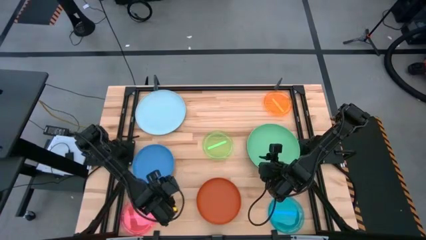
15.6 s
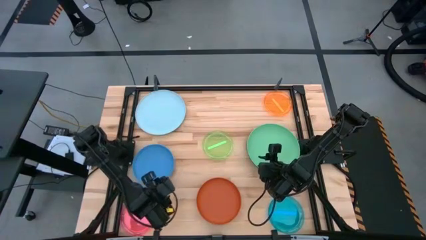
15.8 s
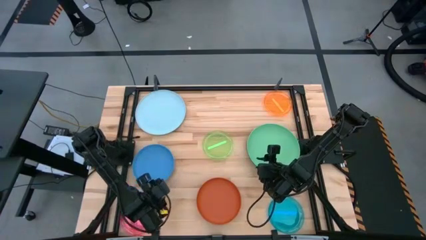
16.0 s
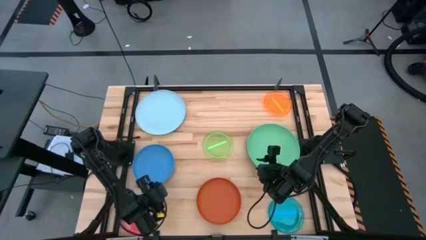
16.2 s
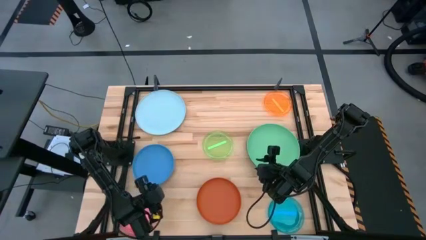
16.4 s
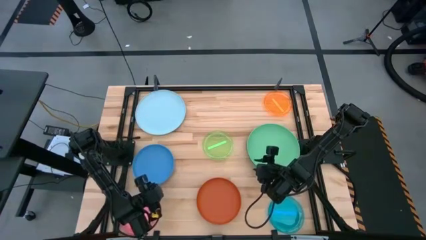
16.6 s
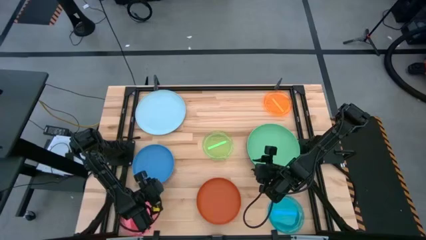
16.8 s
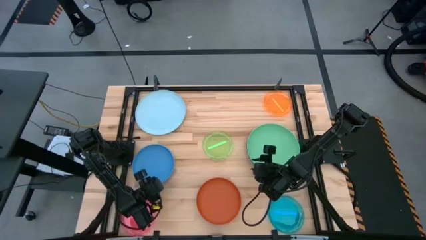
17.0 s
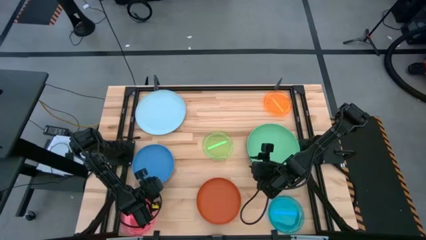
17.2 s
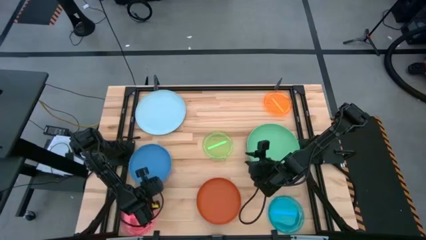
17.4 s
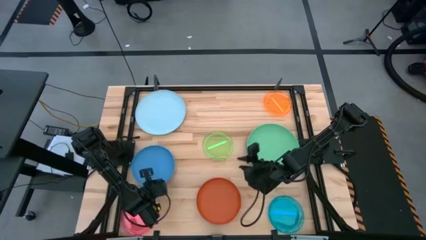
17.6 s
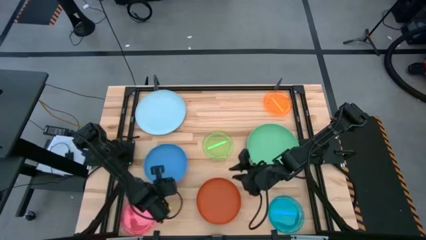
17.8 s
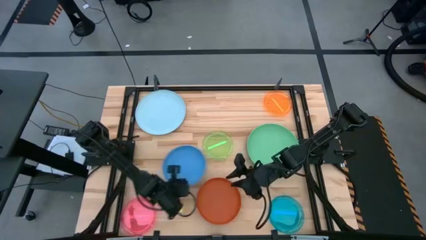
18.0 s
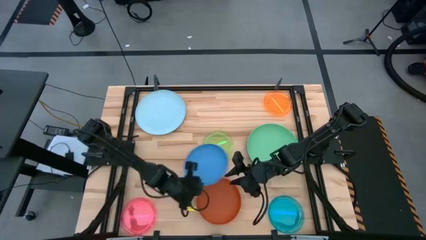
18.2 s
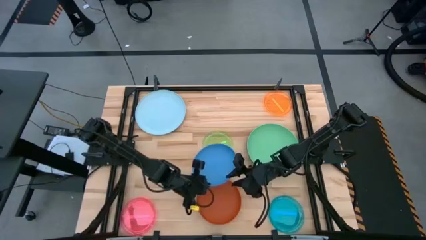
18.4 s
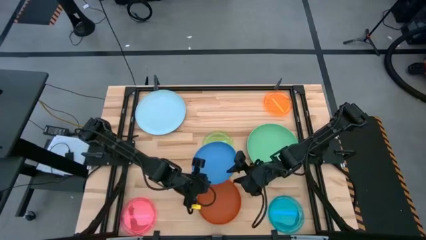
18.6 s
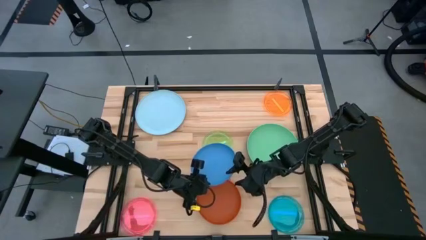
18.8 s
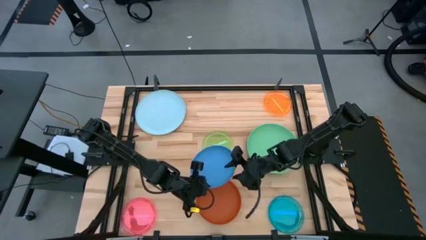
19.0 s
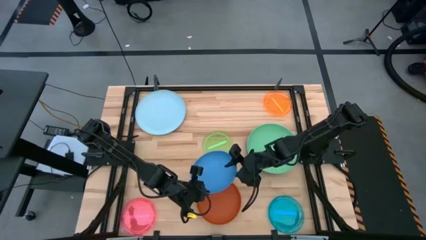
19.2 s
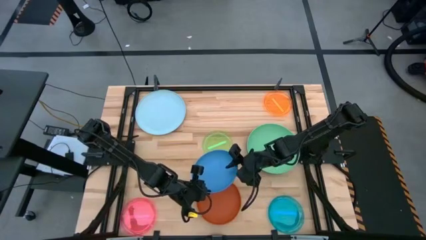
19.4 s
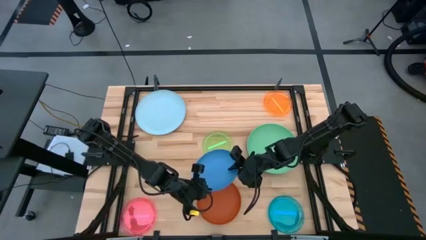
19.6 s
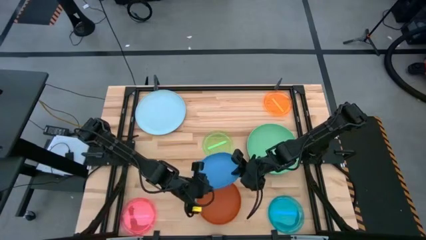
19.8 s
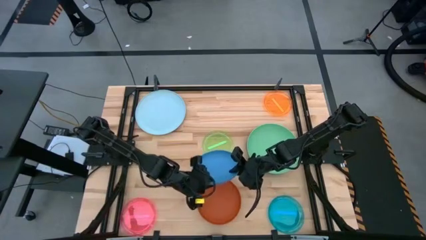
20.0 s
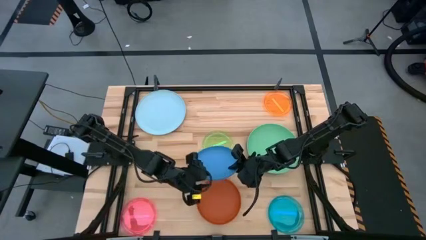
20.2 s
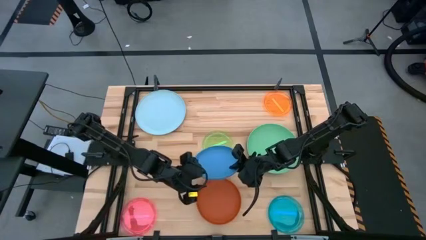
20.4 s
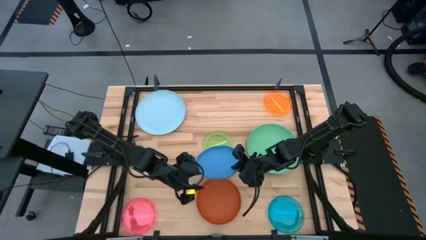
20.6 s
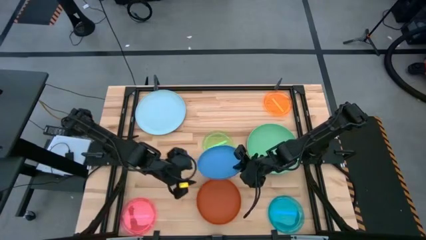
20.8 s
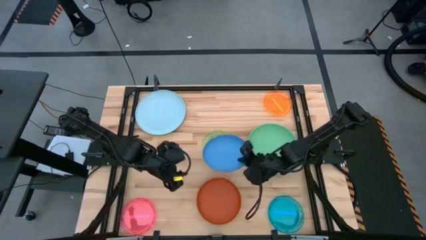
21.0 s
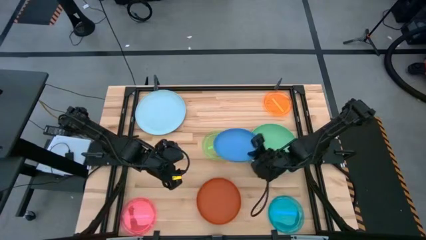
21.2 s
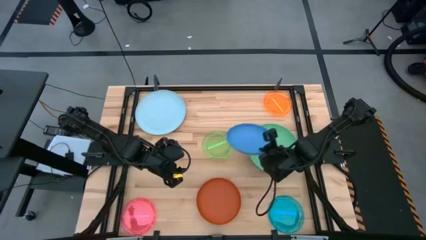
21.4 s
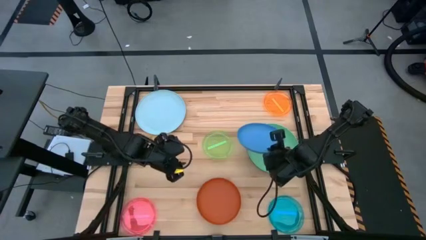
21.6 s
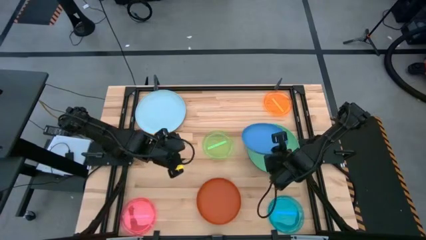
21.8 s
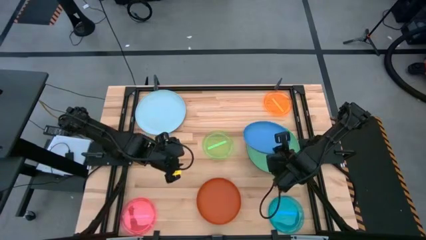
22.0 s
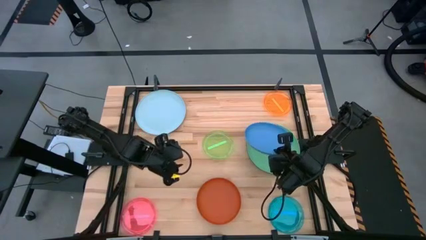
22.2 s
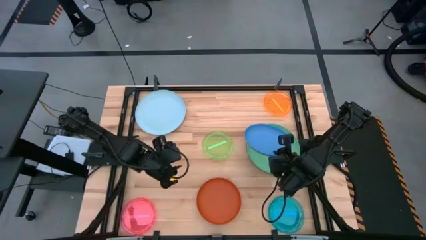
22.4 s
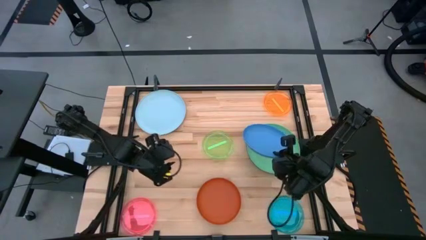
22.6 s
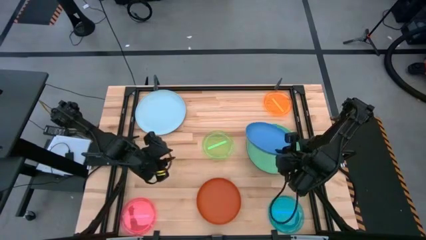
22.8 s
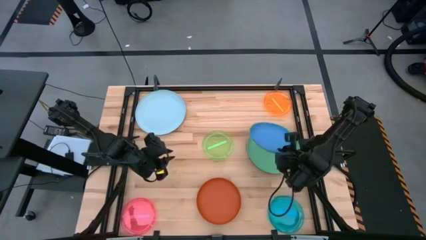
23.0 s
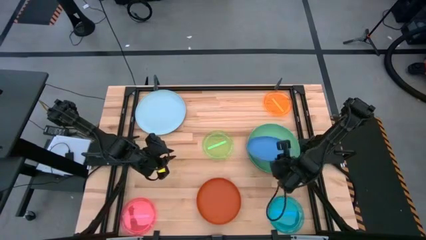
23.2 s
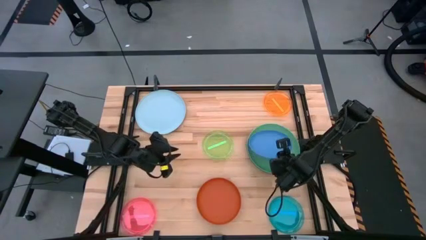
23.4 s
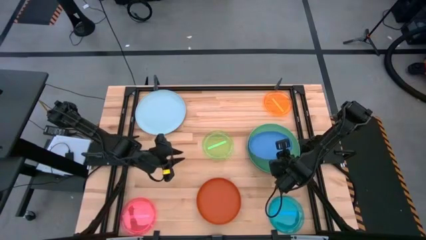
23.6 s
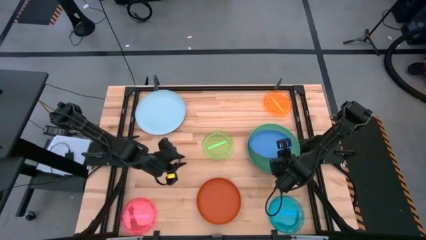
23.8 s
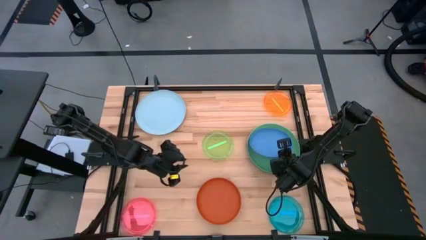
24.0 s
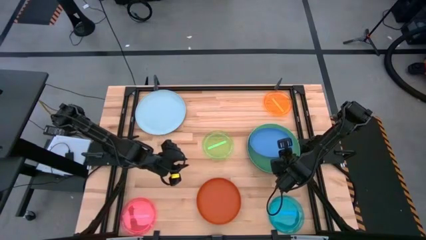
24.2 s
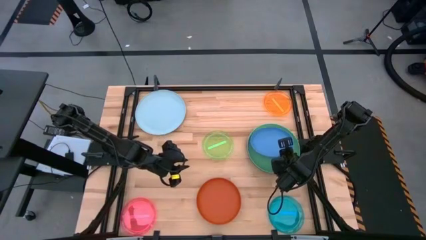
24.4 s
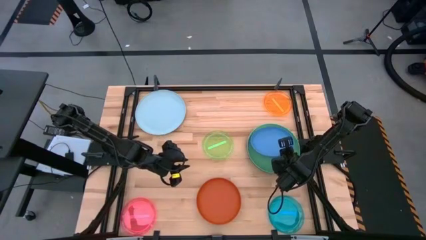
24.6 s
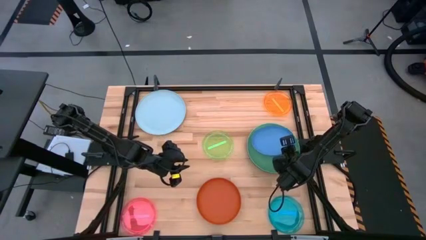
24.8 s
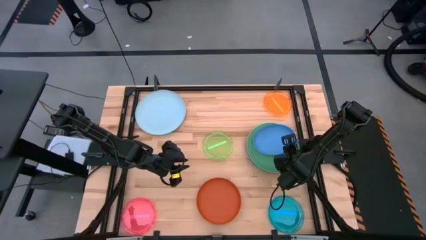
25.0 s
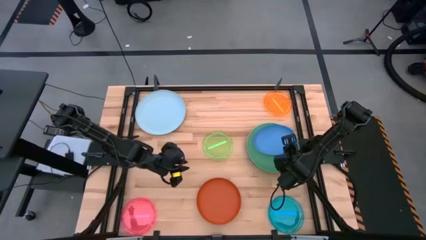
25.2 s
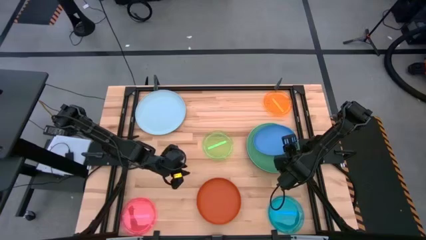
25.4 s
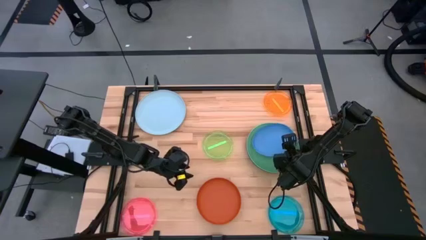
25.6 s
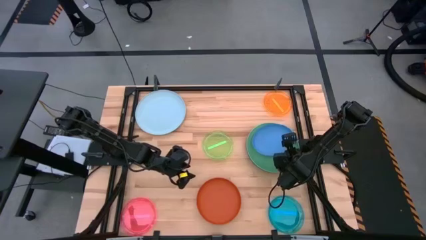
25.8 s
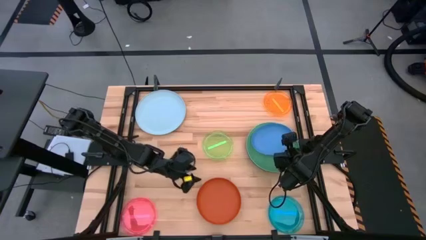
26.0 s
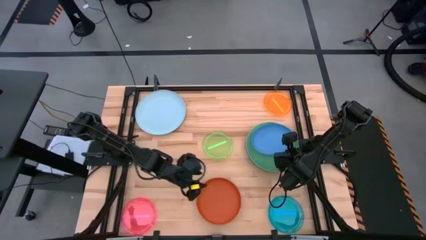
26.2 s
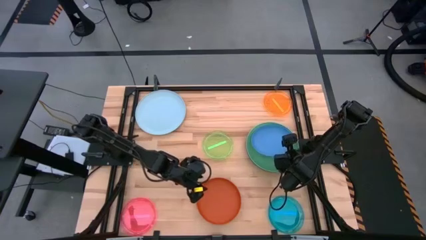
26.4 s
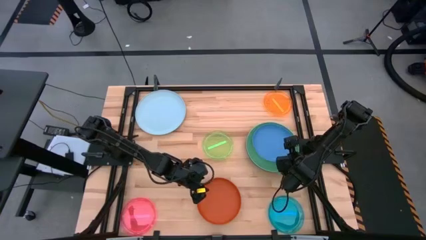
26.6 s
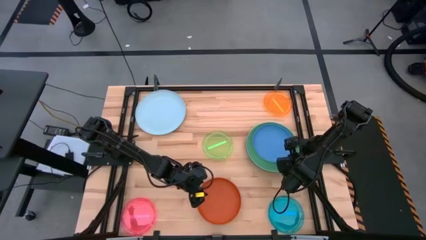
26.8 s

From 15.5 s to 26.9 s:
Task: Stack plastic plates
Stack the large dark blue plate on the large light green plate

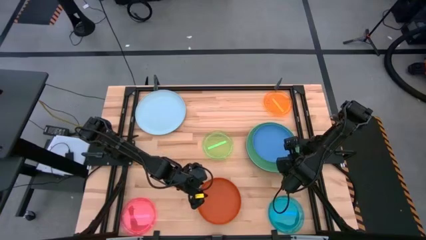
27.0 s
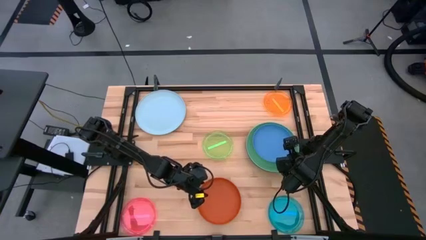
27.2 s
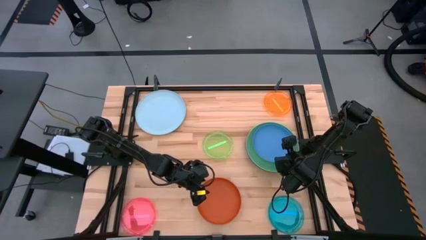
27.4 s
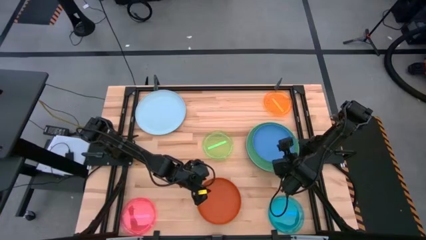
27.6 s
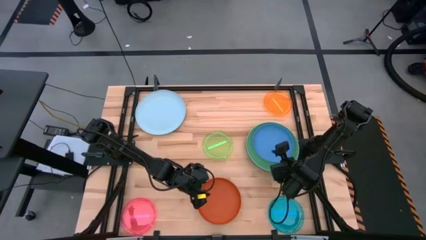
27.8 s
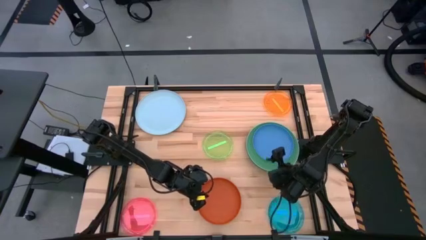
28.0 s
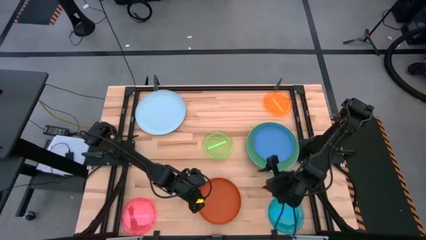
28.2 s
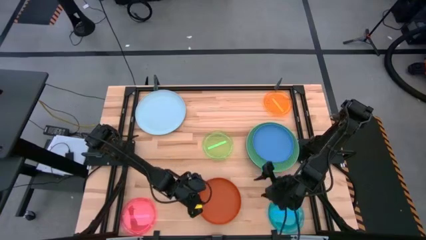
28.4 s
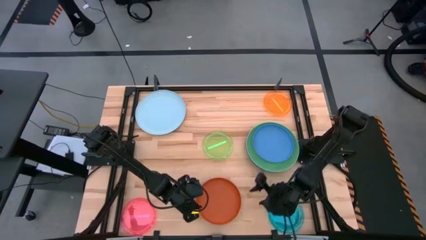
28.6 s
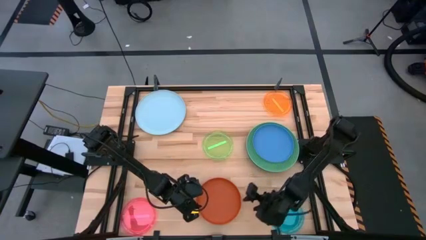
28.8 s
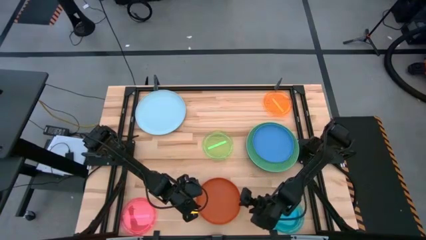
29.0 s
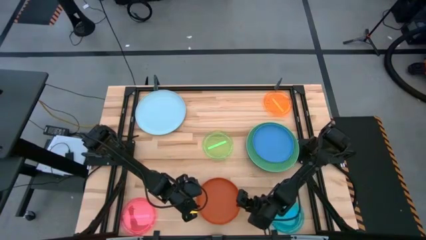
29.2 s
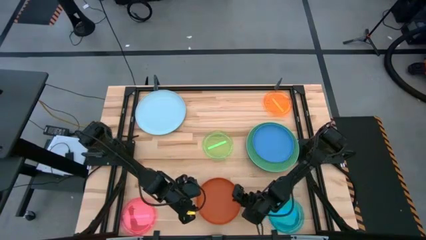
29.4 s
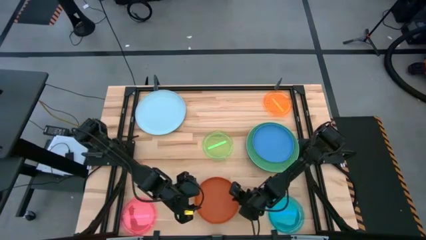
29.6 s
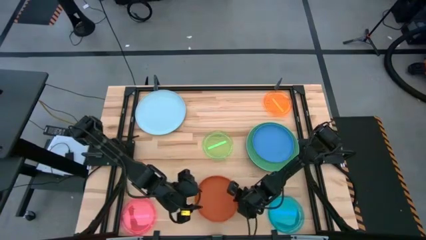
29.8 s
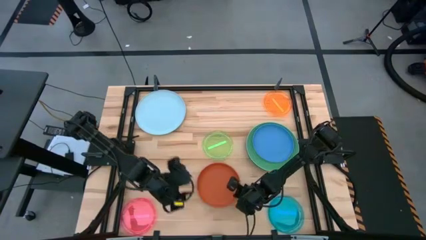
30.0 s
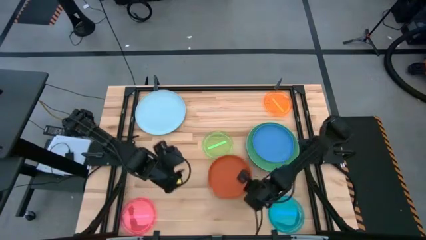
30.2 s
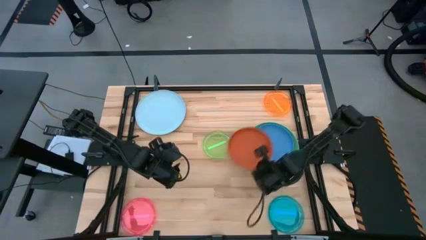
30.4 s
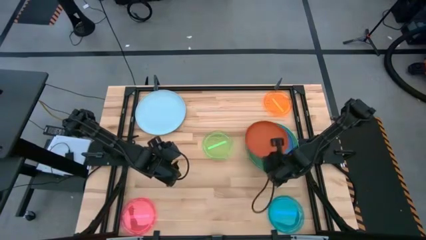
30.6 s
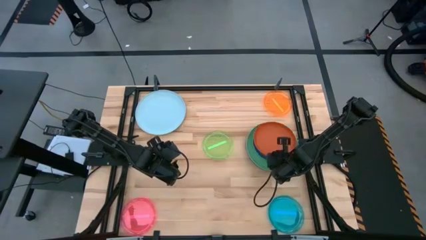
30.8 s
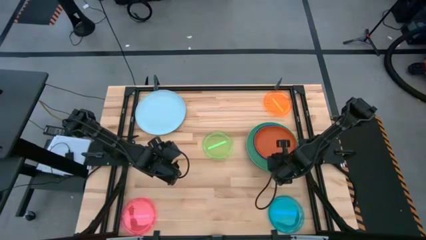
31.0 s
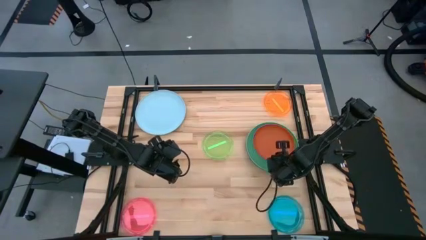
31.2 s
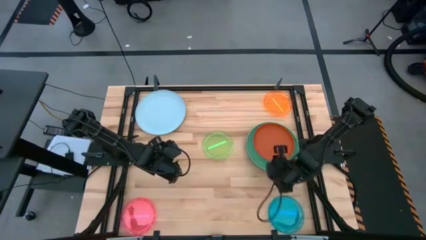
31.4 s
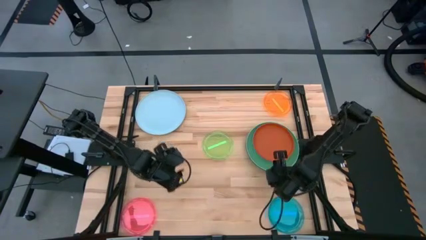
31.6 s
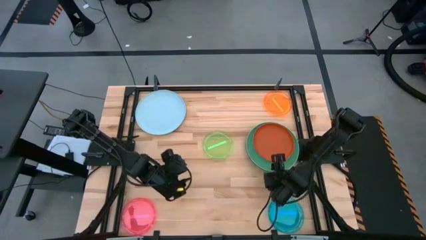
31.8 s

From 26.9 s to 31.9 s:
Stack the large dark orange plate on the large dark blue plate
